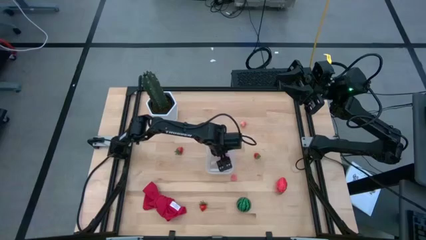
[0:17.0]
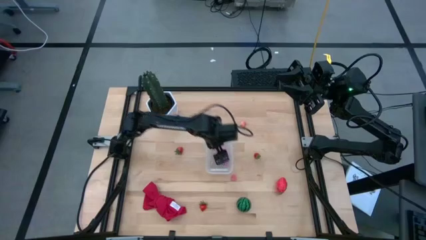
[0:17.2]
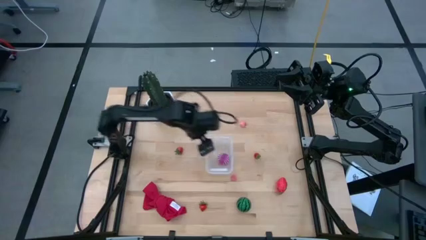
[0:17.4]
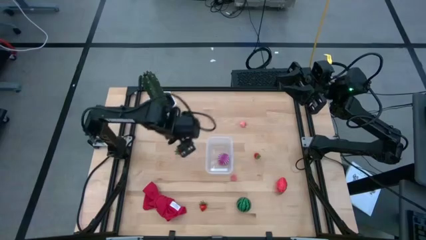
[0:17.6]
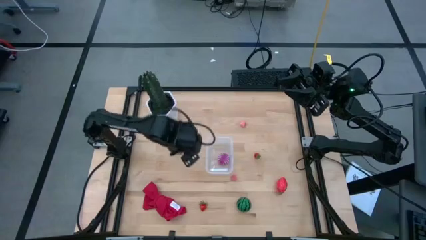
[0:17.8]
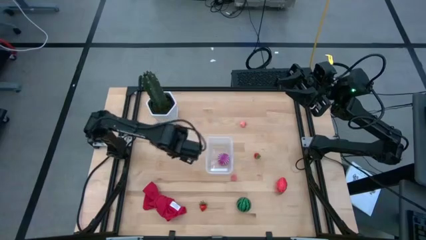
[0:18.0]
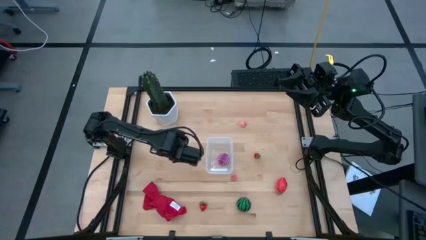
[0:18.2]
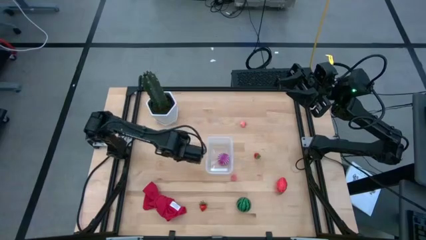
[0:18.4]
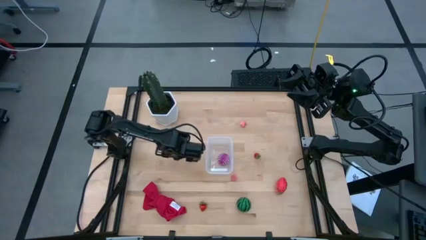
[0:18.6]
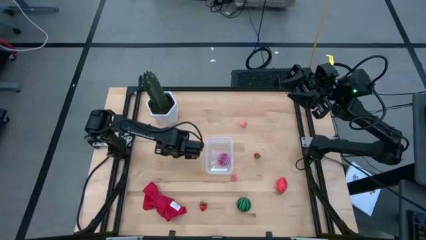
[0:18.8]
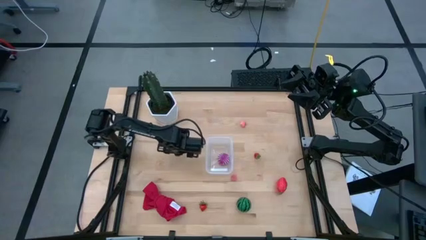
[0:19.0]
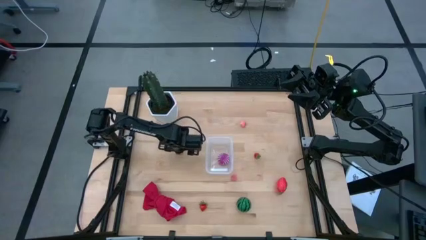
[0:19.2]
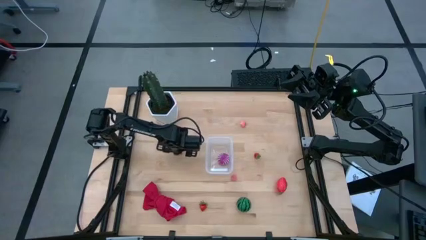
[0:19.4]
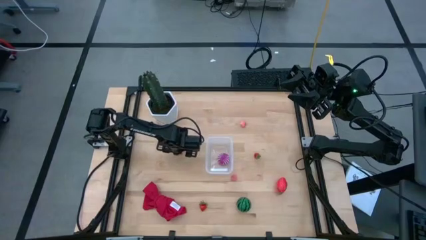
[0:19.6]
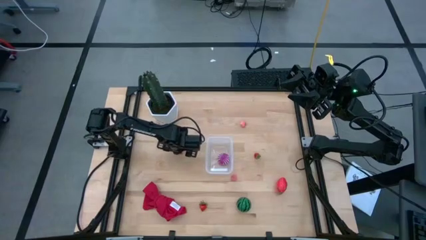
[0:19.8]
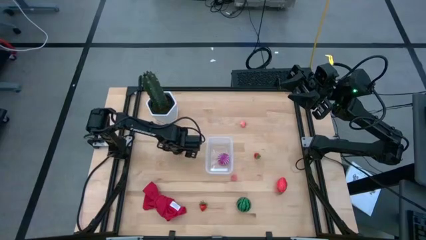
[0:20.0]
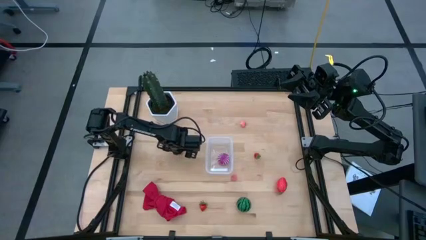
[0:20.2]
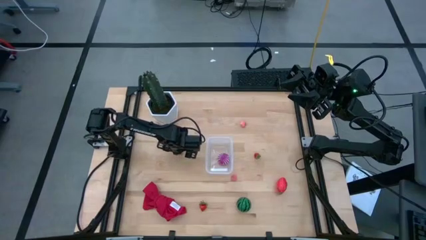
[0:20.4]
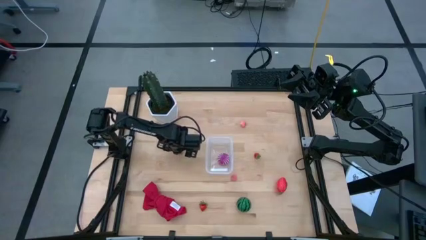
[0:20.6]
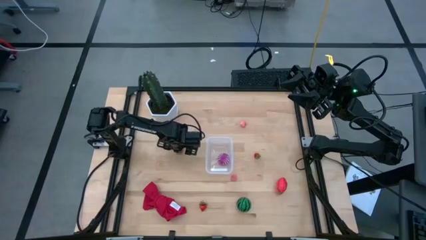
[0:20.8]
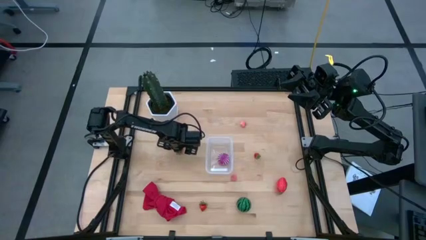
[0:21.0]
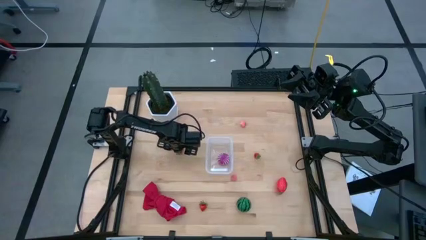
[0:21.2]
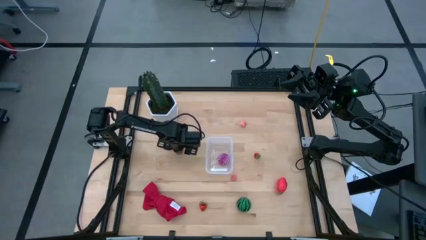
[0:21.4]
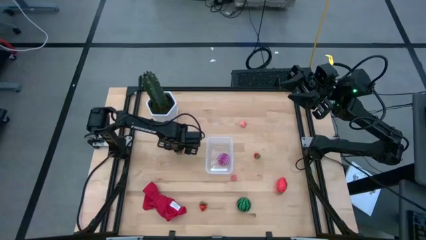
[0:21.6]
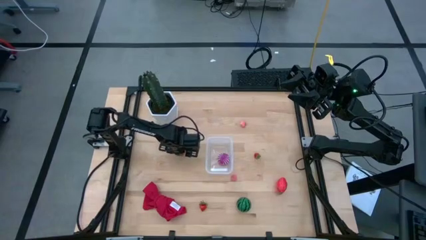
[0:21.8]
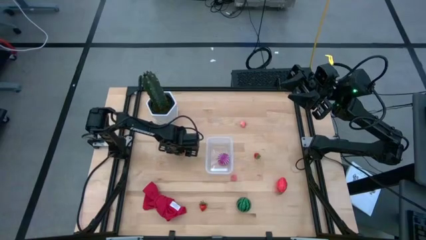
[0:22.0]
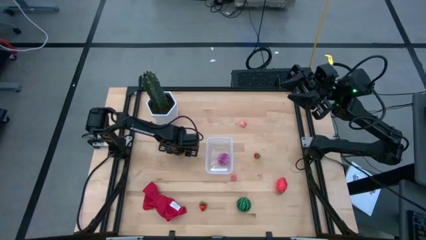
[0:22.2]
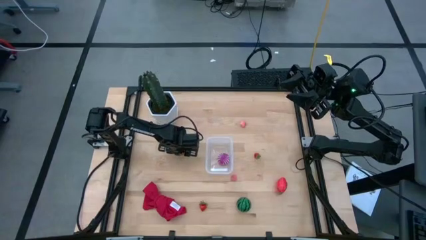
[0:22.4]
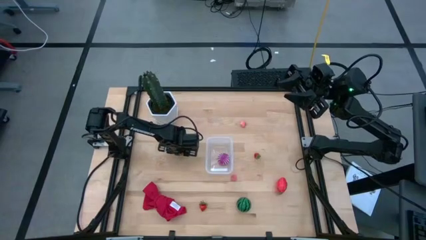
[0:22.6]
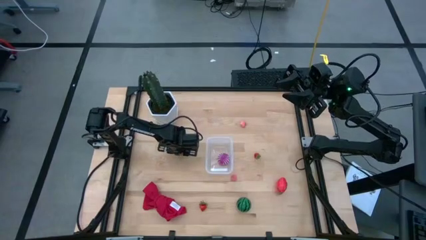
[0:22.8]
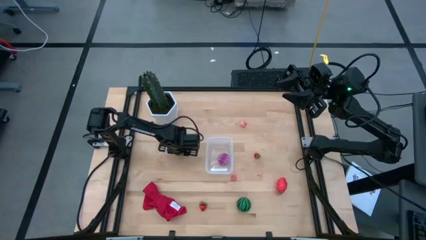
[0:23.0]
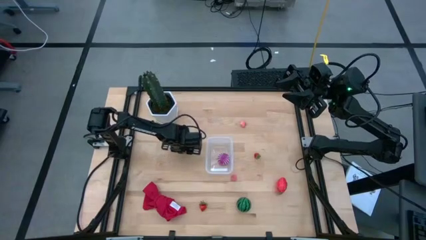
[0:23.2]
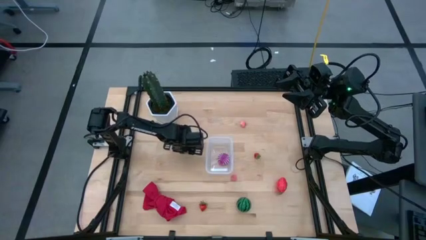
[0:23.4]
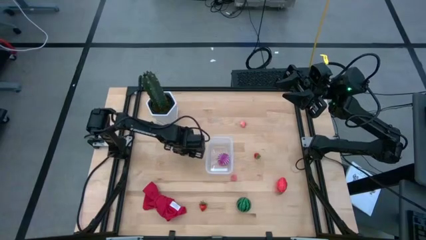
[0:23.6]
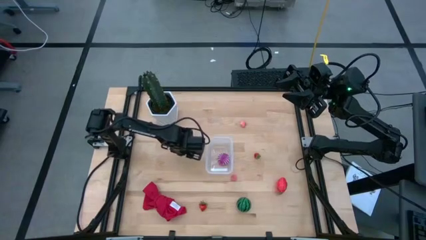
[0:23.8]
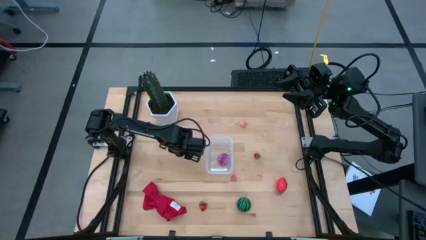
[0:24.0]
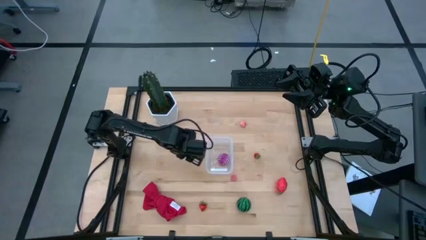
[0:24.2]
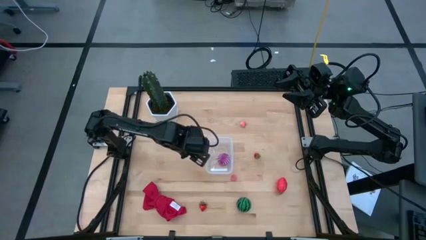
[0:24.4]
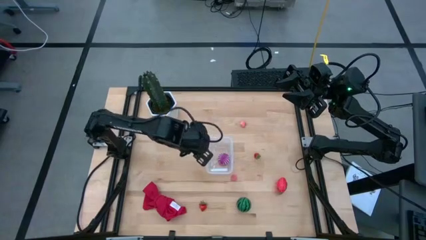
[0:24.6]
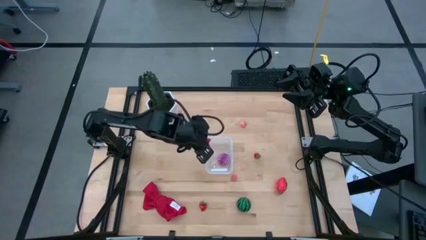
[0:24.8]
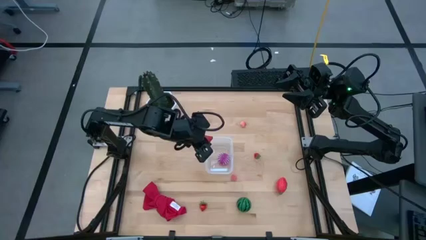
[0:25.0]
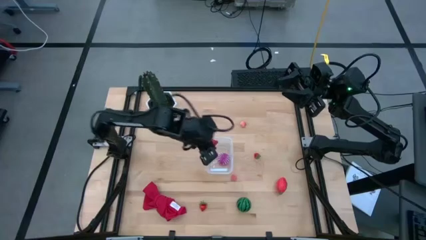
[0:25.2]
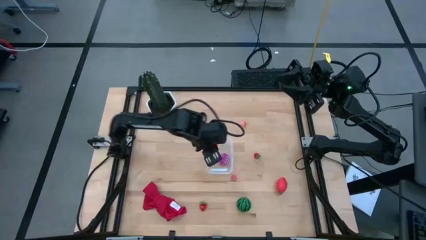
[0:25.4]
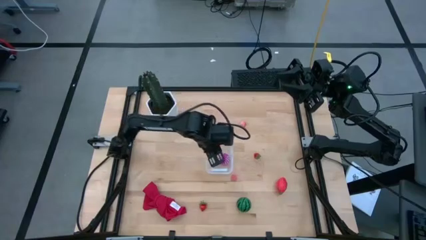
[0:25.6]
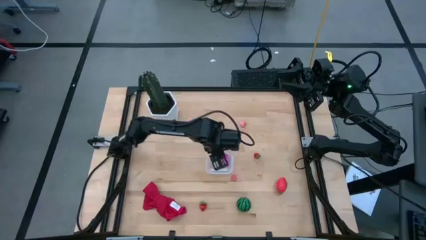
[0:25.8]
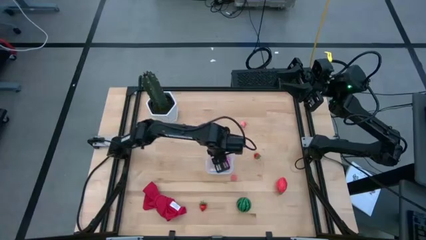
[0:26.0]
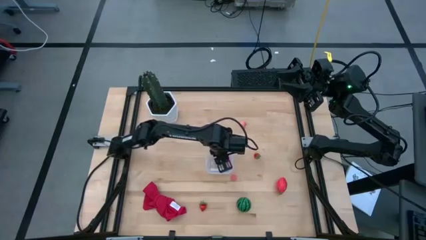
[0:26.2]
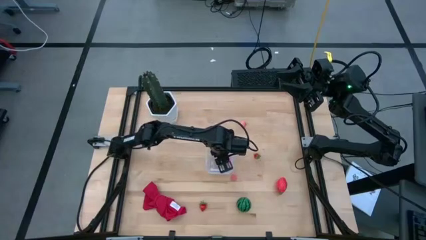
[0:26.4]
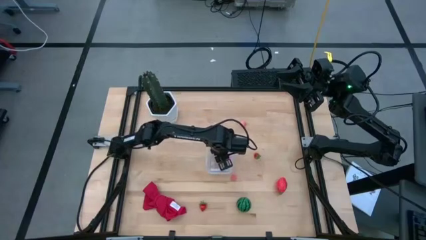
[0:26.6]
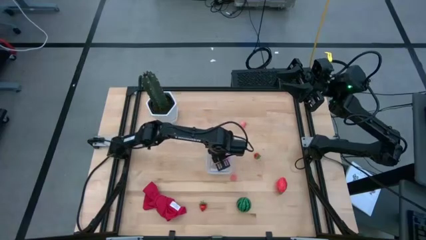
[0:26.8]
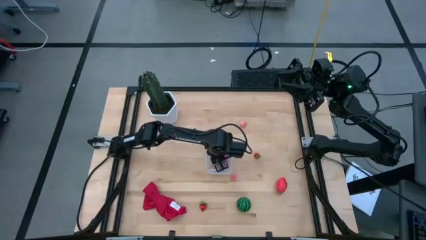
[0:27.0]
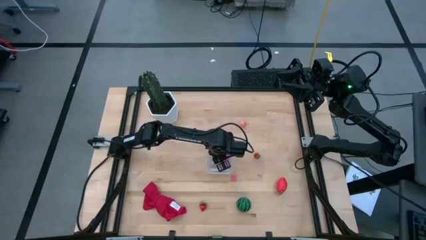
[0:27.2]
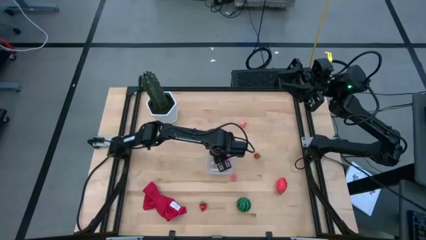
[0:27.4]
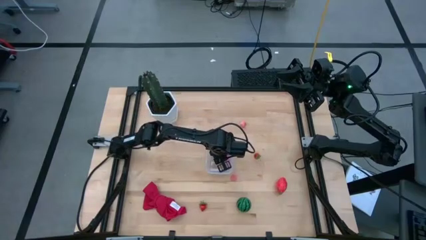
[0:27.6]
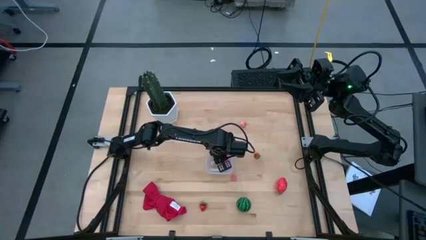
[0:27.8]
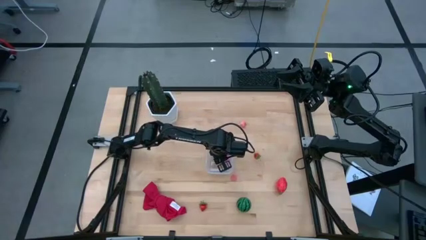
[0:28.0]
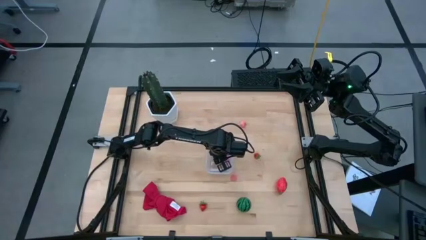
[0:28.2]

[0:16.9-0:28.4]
Task: Pick and placing Produce into tupperware
Put the top left red strawberry into the transparent bin

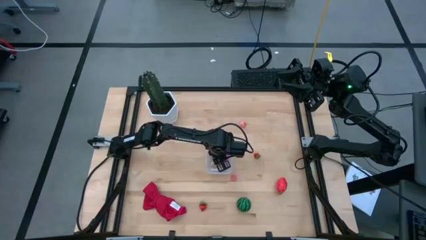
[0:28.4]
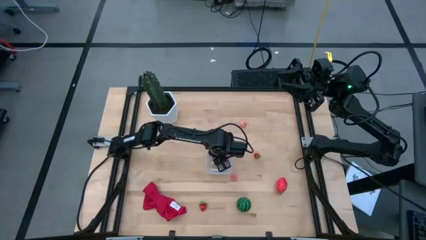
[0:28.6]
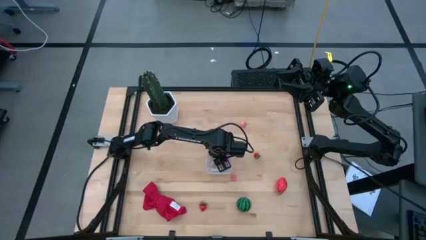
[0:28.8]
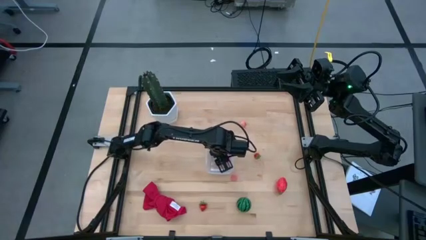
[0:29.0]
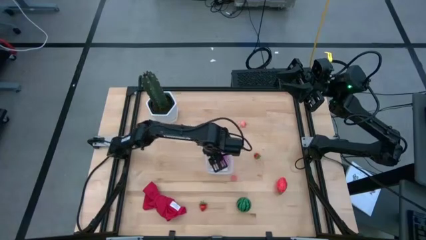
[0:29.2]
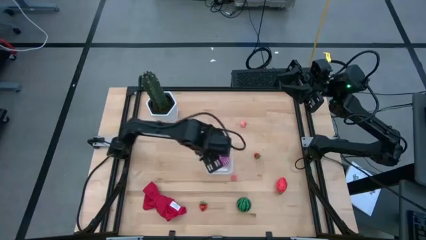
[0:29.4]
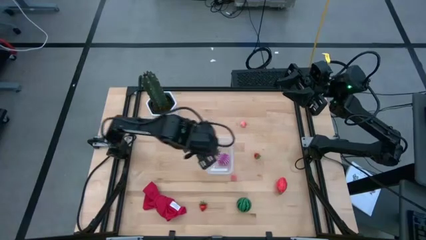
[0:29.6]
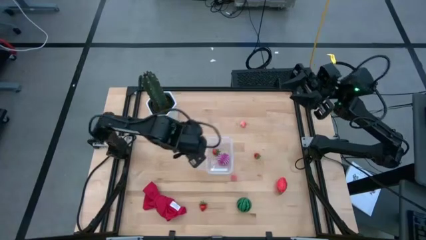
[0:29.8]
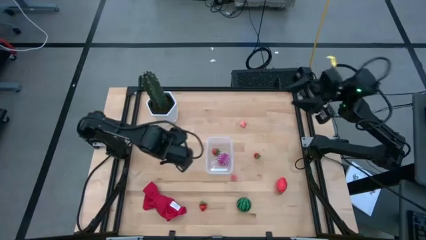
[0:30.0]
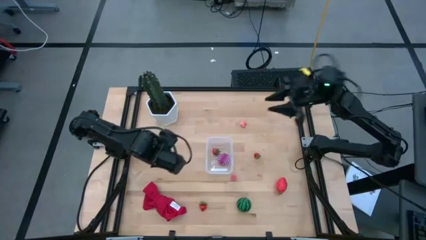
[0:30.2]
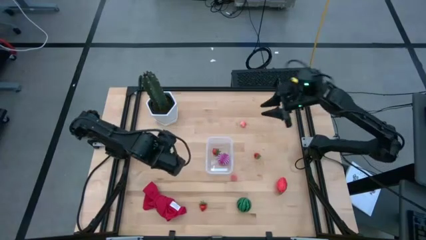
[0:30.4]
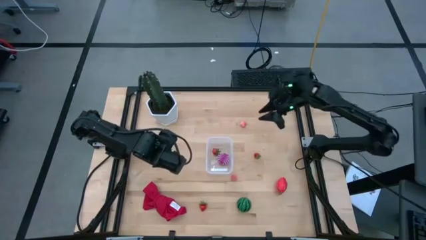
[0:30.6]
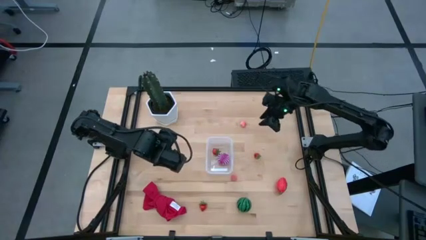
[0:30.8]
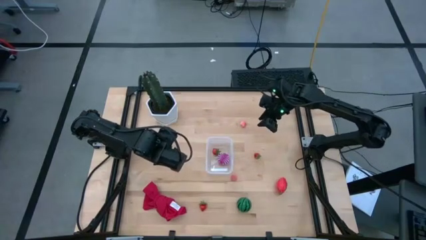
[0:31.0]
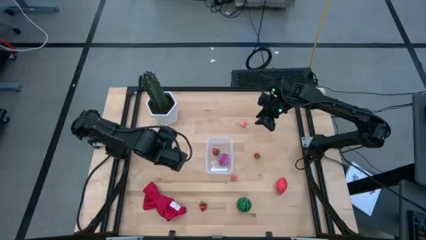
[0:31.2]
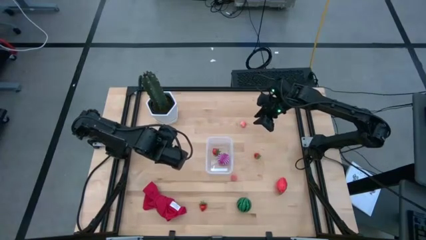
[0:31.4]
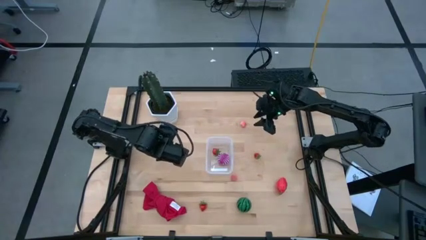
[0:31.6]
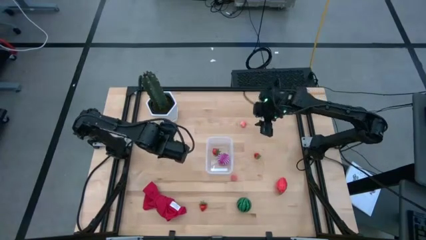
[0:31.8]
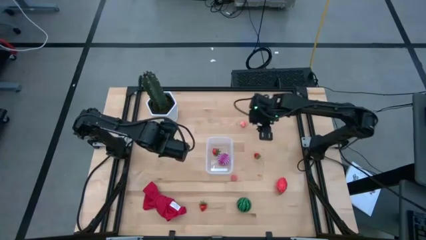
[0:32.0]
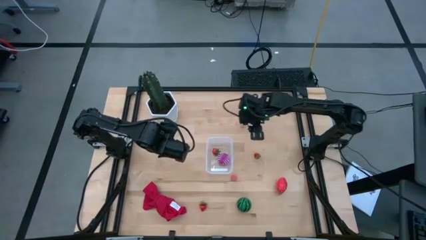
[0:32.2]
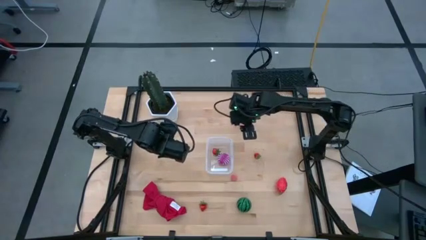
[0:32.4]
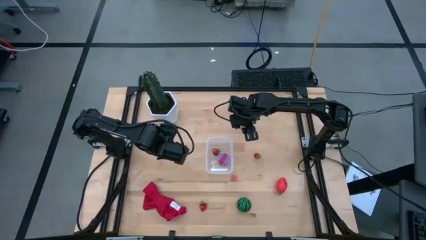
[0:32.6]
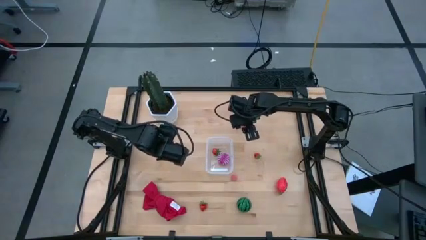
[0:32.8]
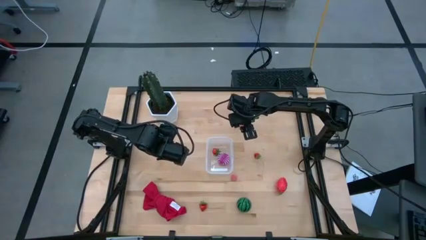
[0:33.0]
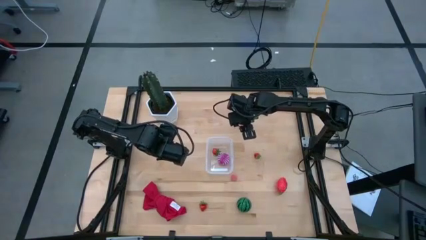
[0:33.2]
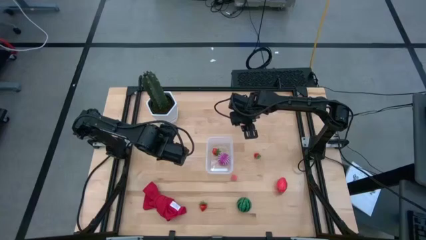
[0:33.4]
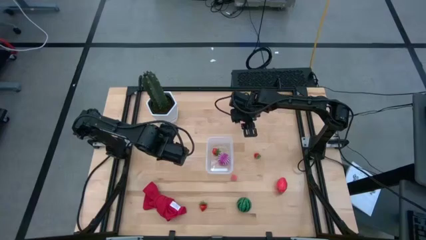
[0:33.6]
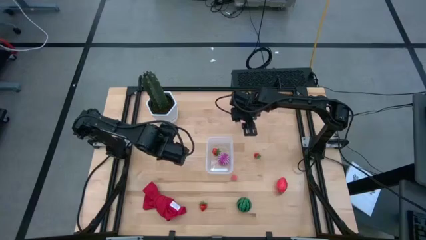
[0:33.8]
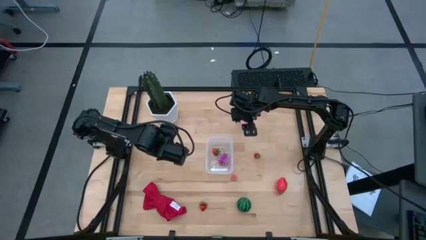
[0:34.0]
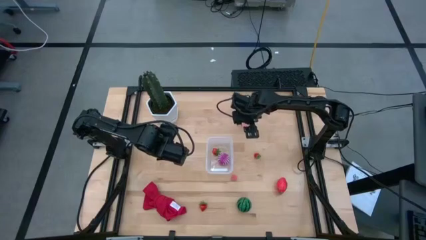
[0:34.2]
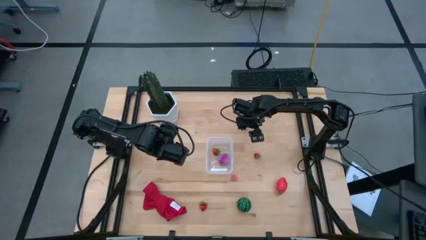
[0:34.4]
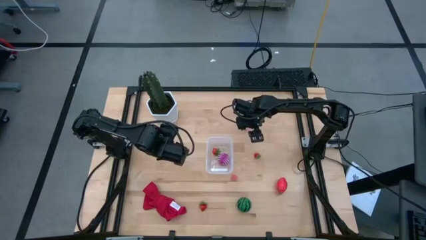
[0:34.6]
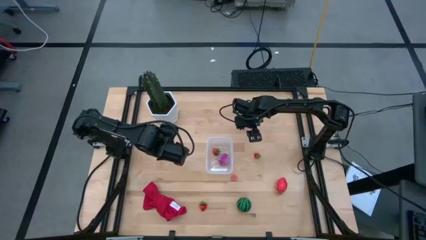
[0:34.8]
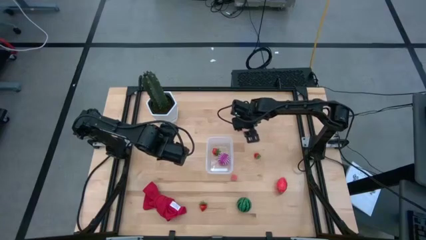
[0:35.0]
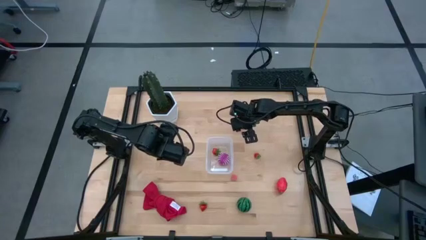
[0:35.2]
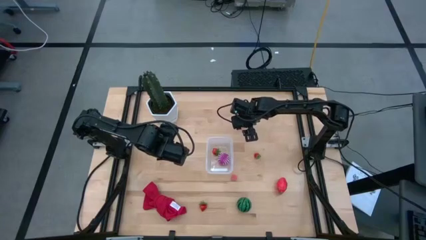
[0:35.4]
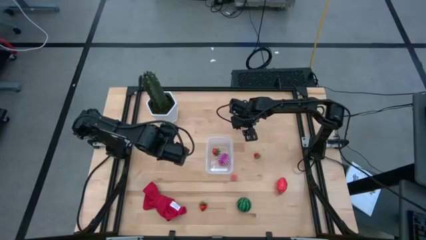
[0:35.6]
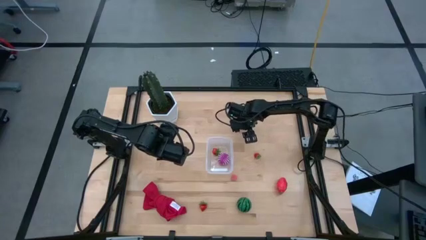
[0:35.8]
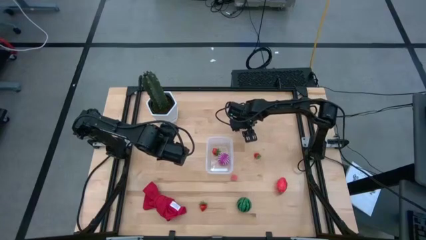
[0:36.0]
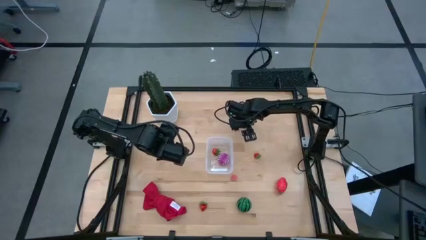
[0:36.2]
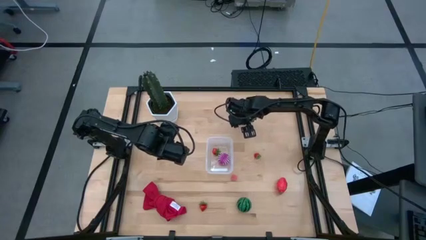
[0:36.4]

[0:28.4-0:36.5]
Put the top pink peach into the transparent bin
